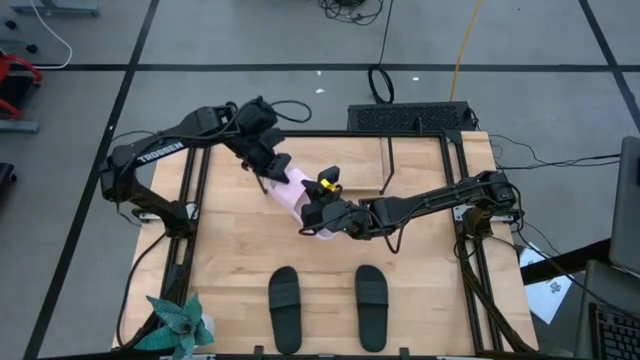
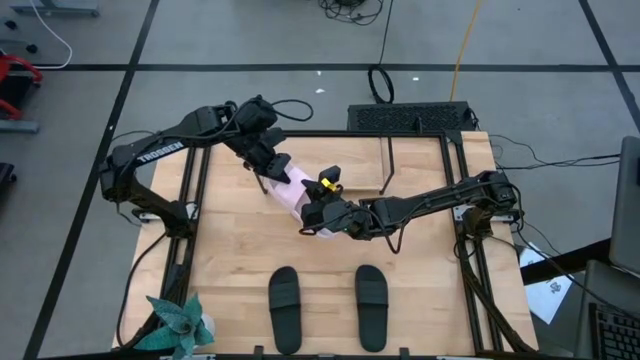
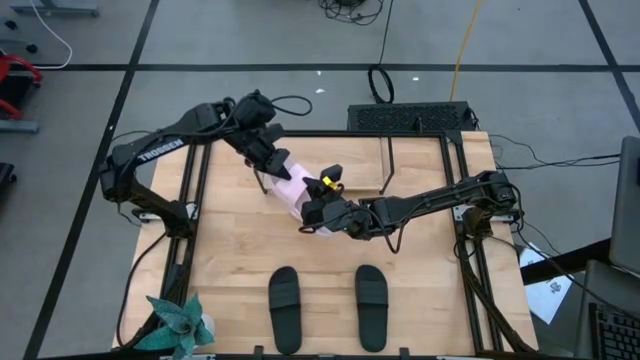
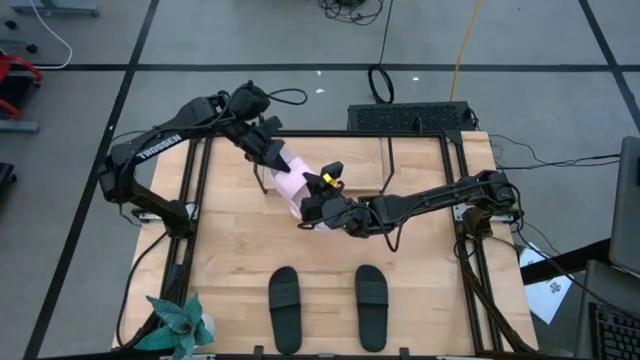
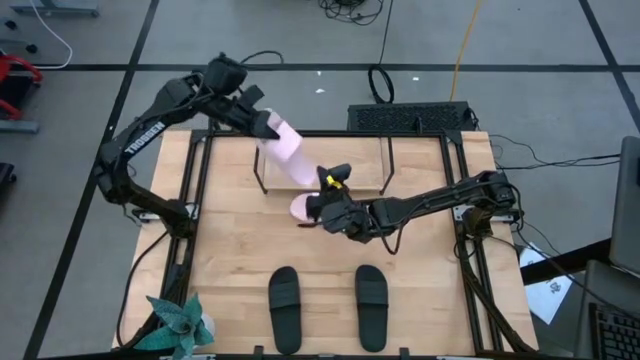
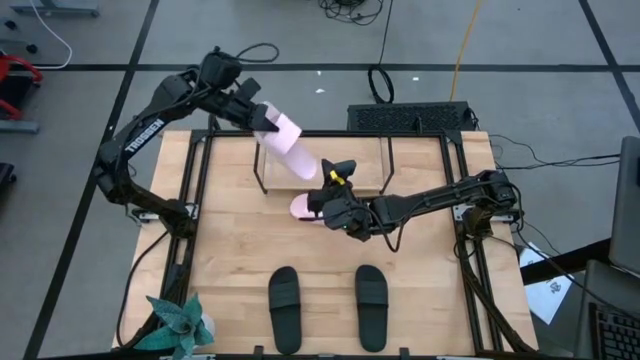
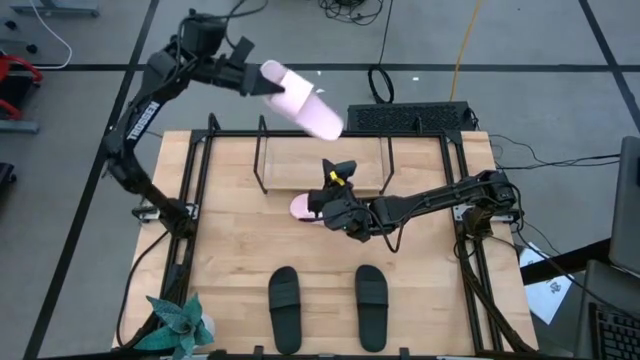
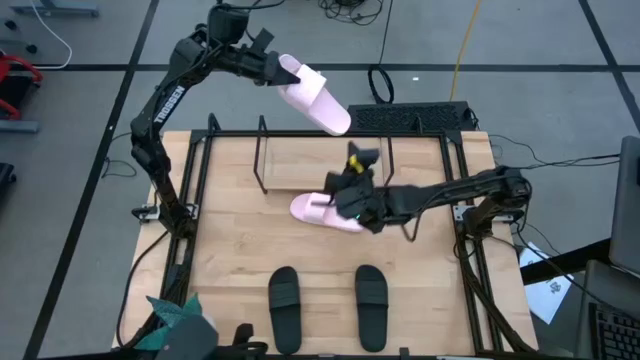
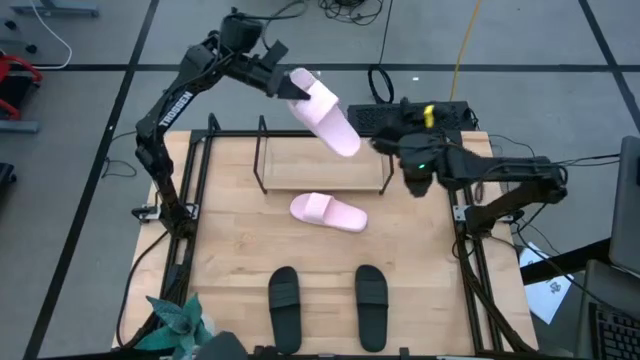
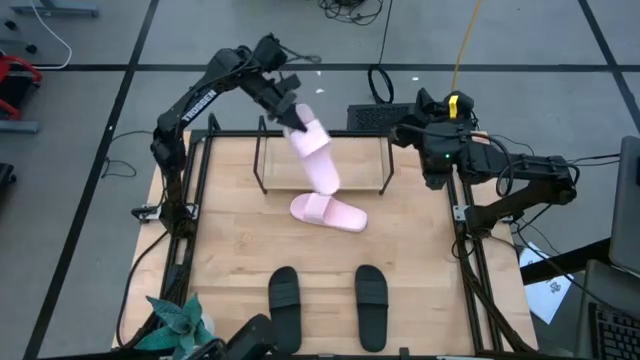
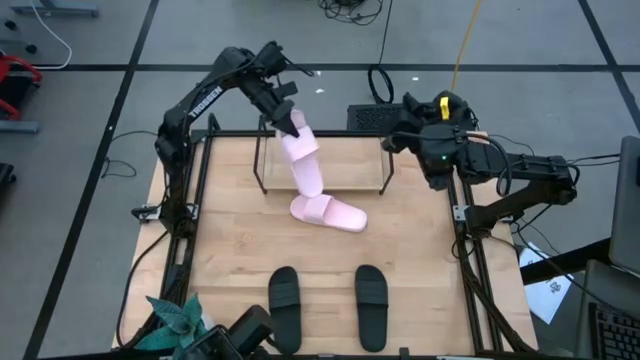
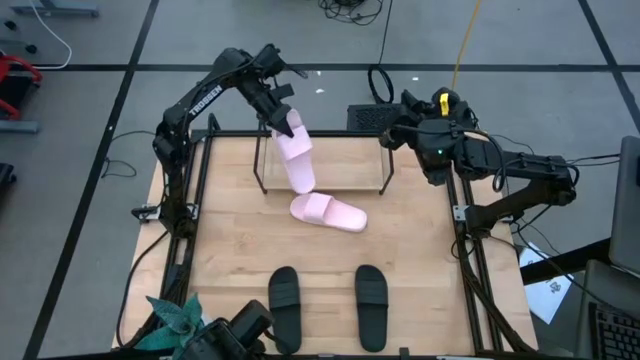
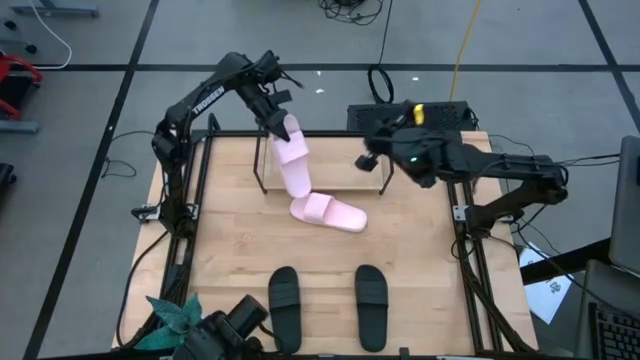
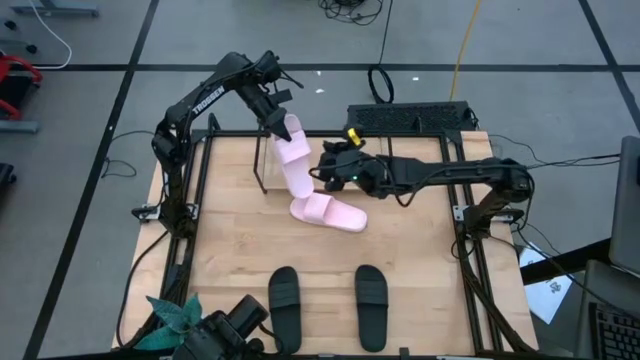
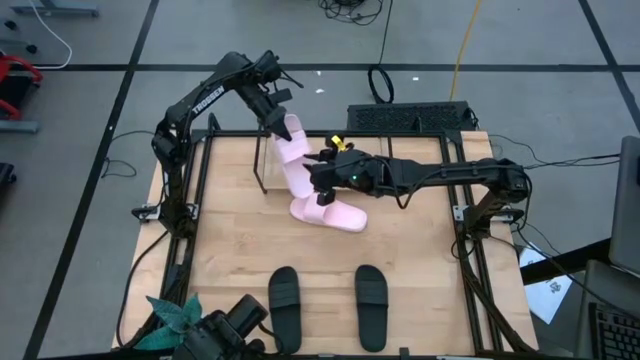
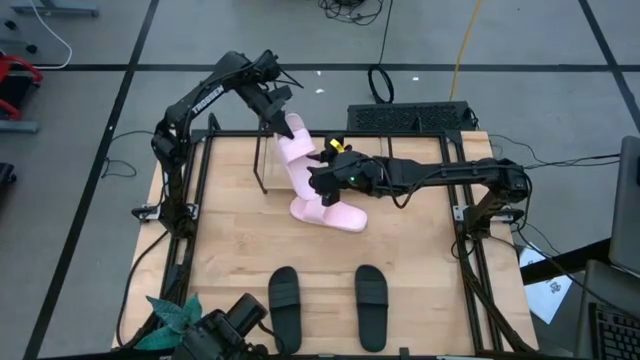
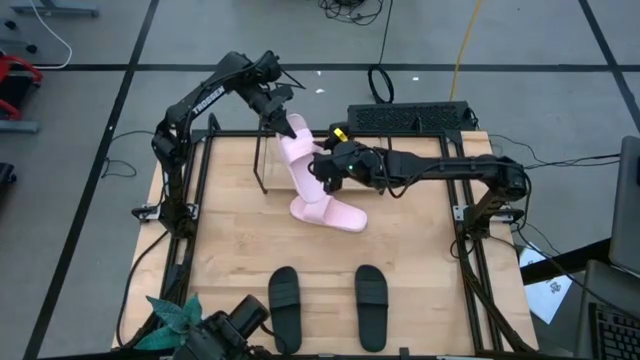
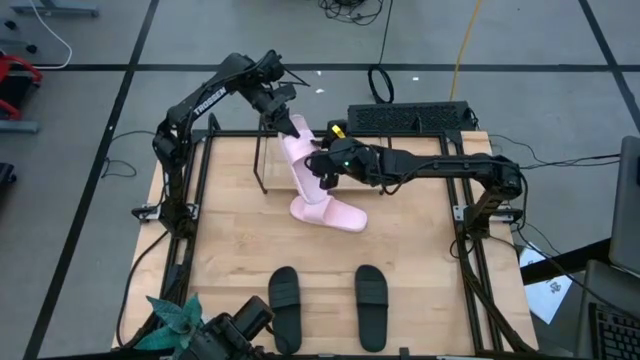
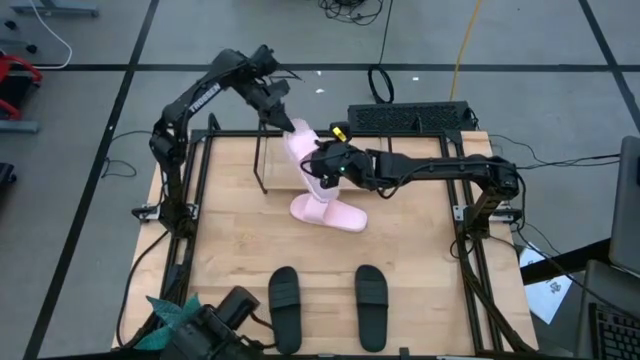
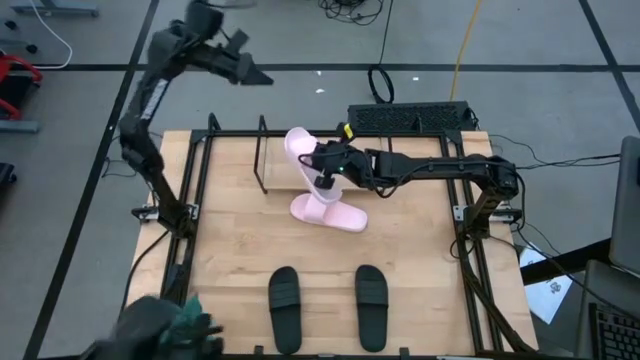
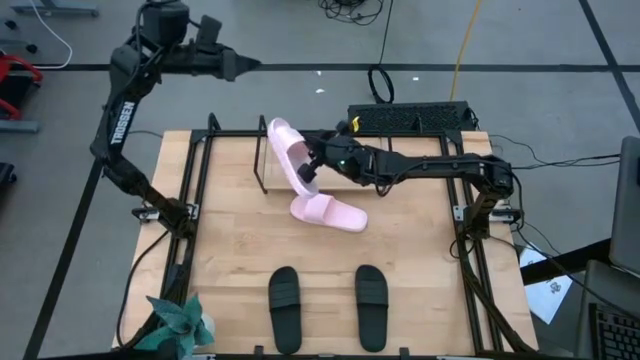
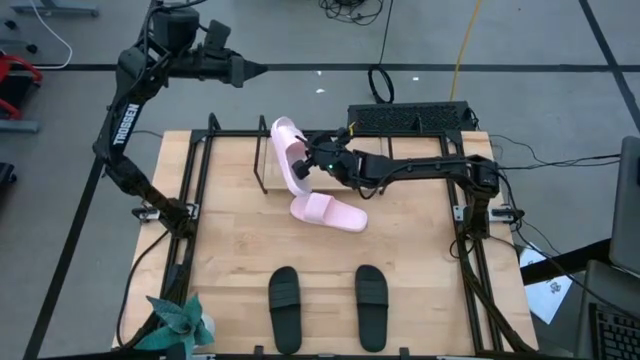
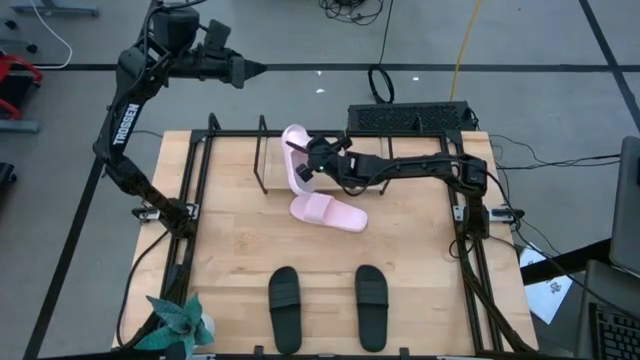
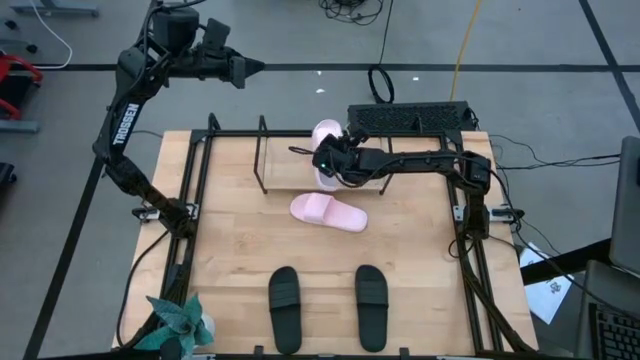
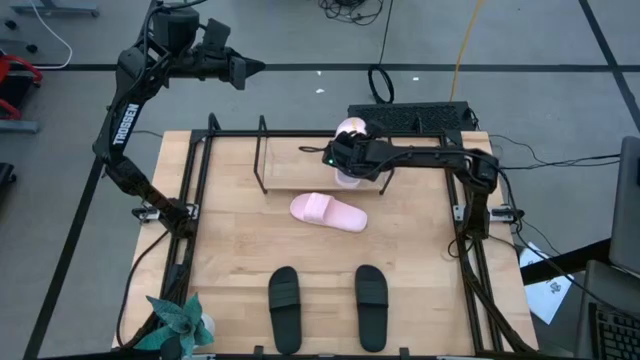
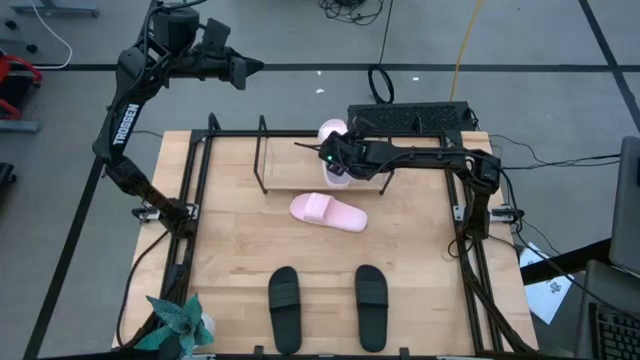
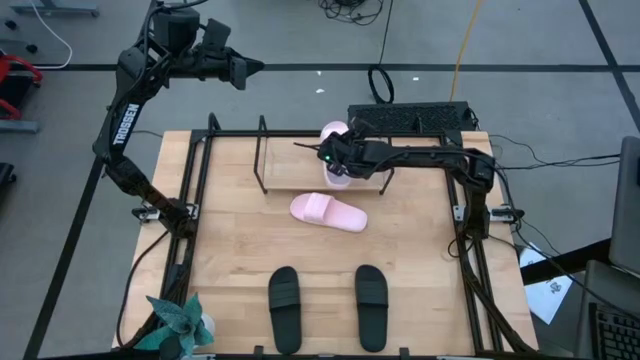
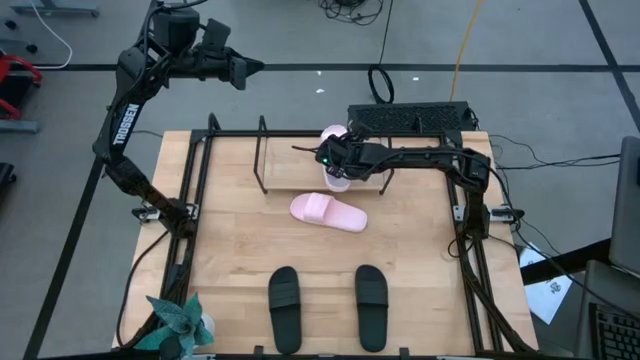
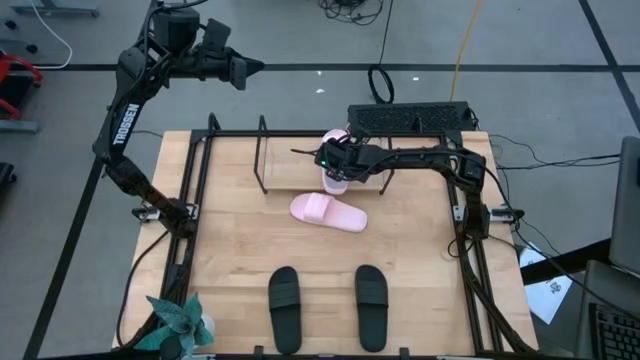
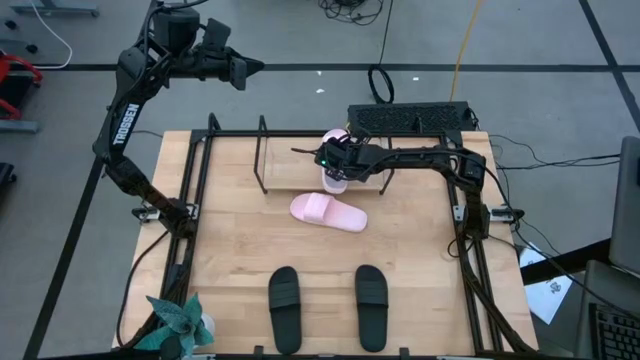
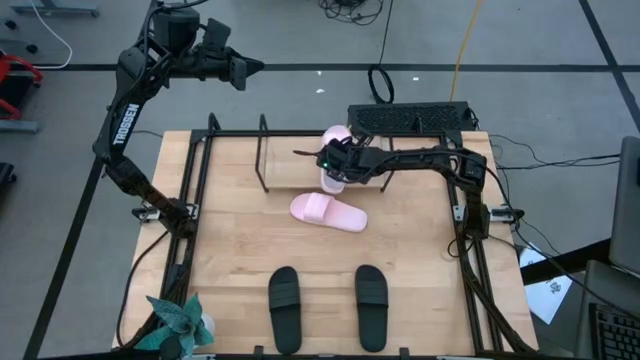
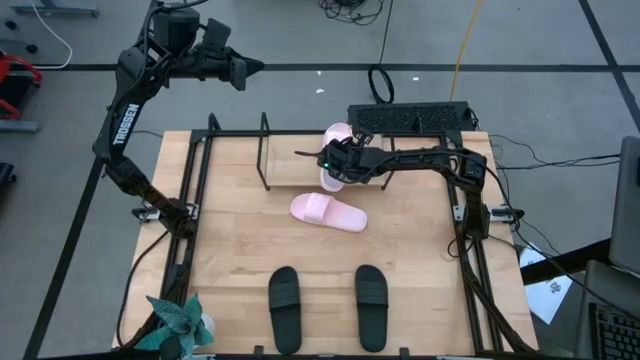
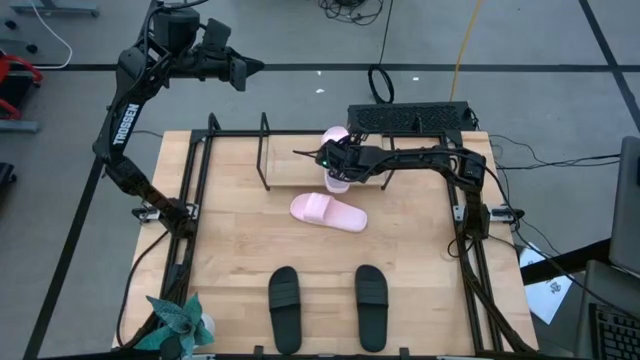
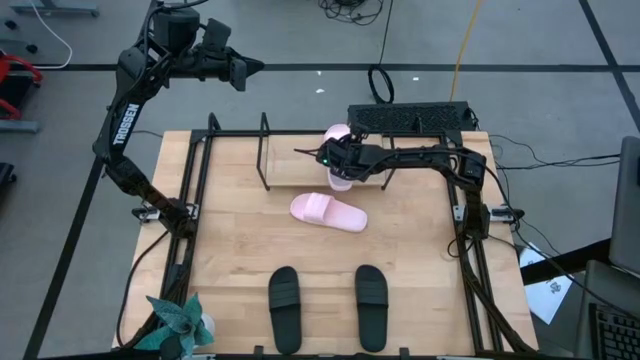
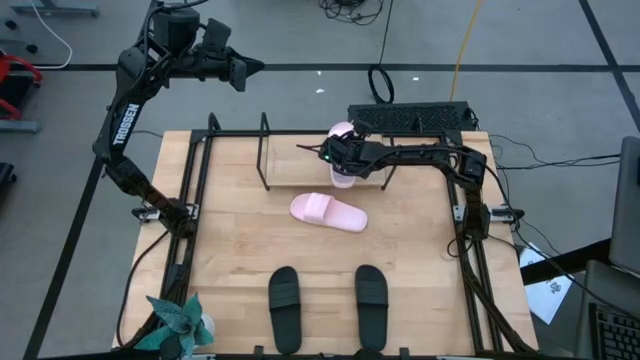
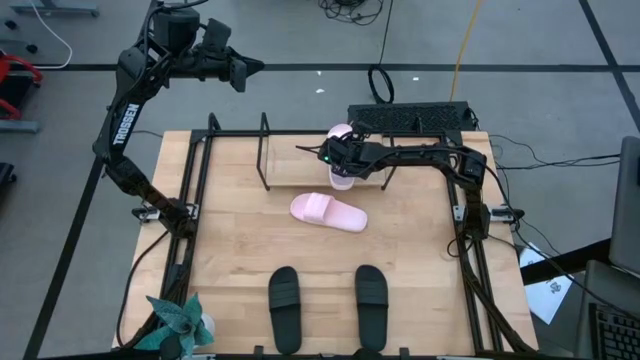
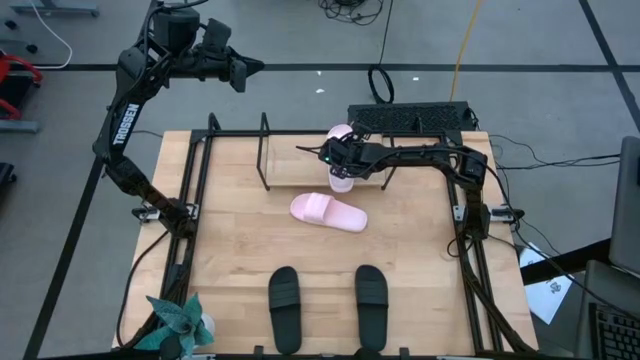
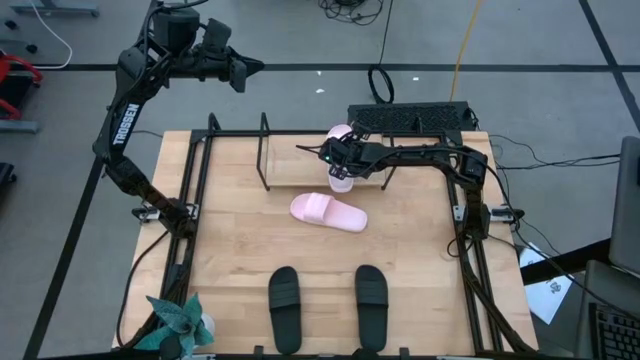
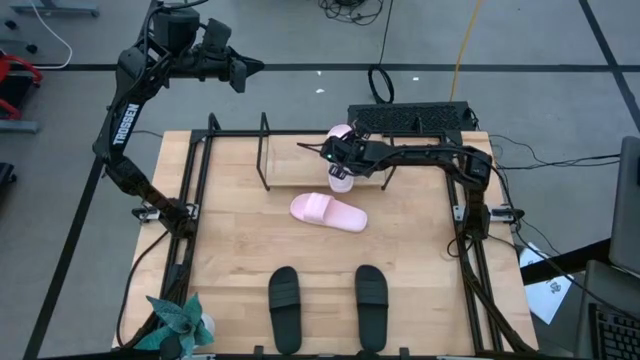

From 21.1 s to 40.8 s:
Task: Pick and place slides into the shelf
Put the bottom pink slide on the shelf

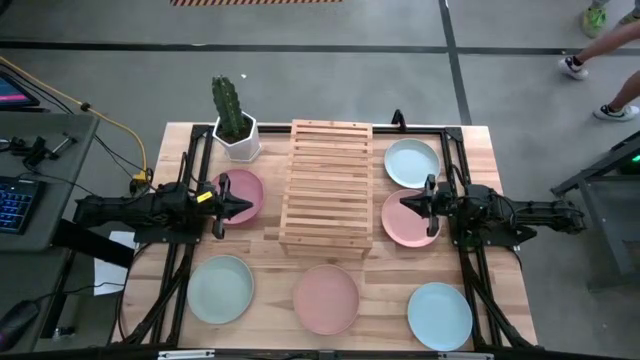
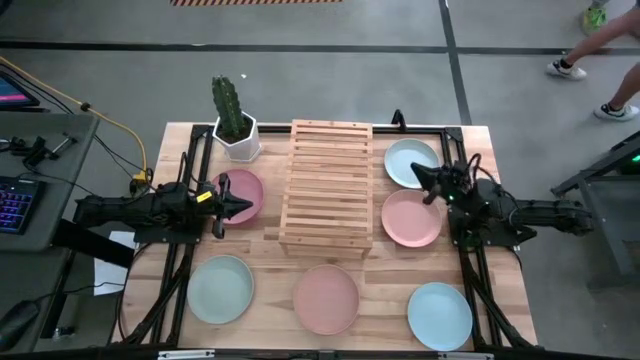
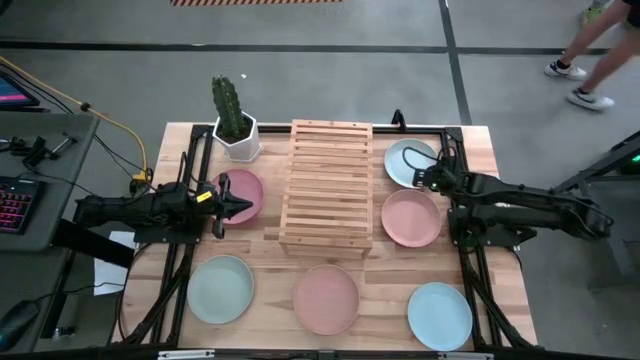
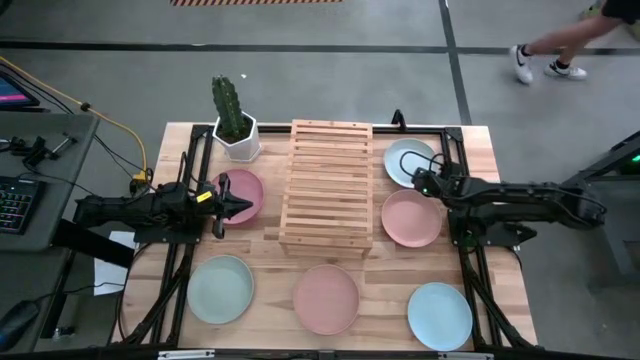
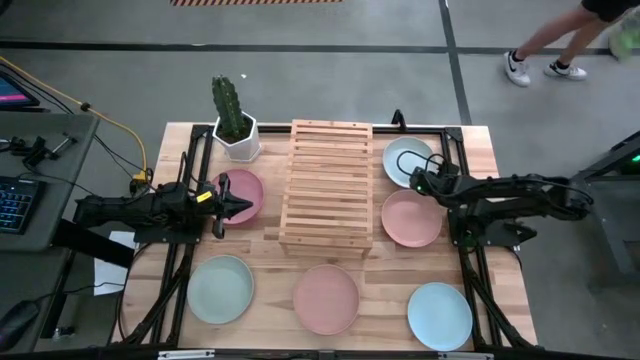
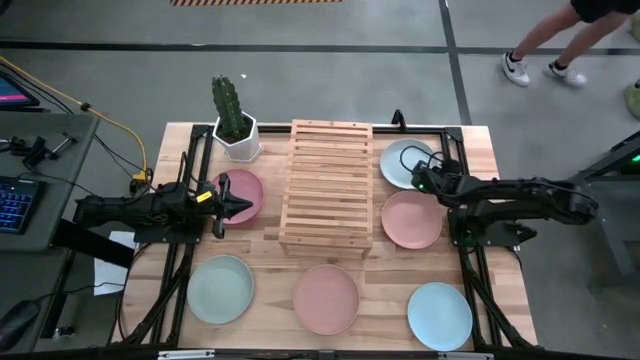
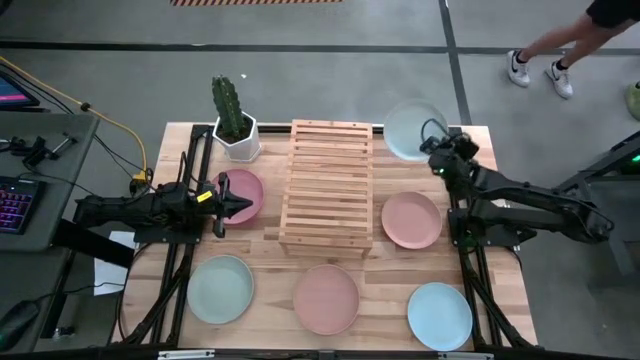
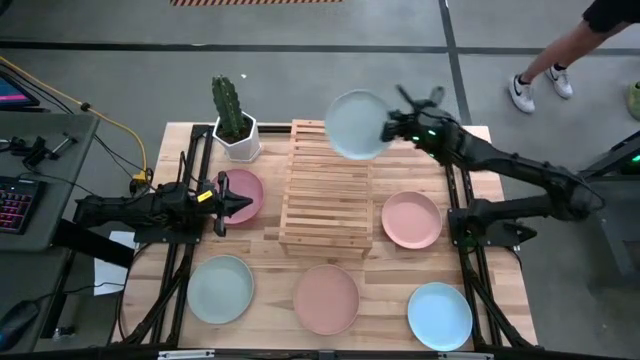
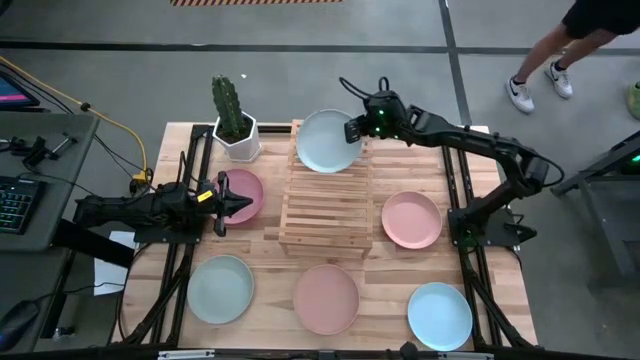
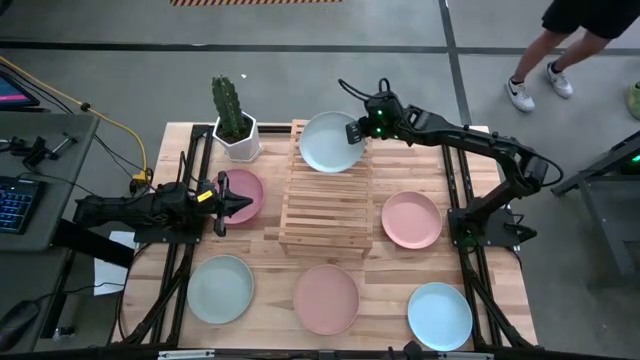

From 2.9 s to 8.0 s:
Task: Place and stack plates onto a shelf
Put the gray plate on the shelf
